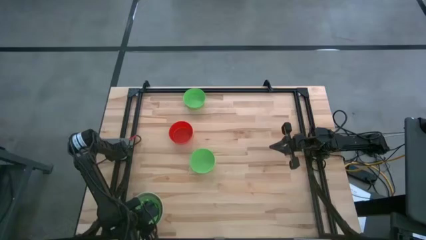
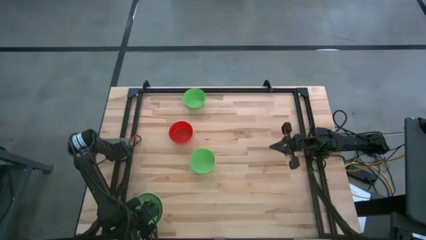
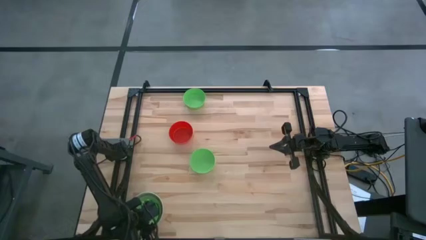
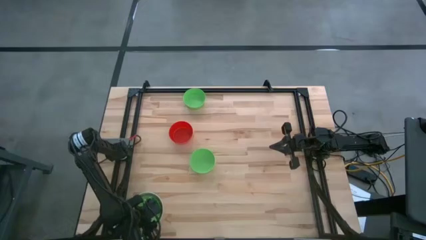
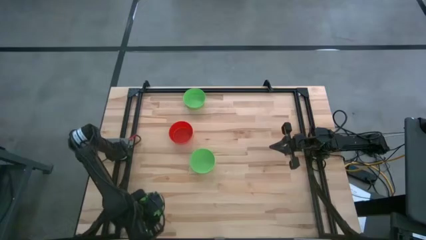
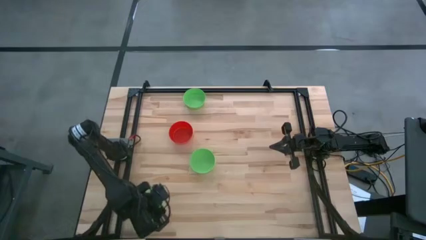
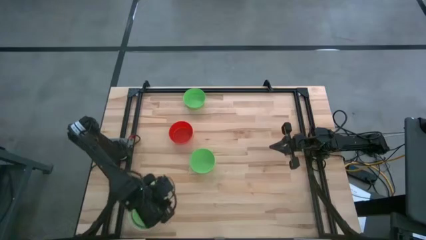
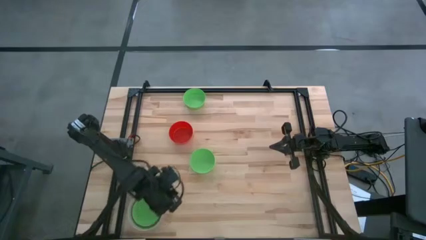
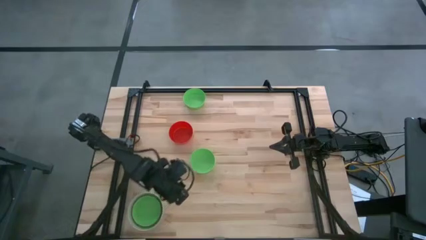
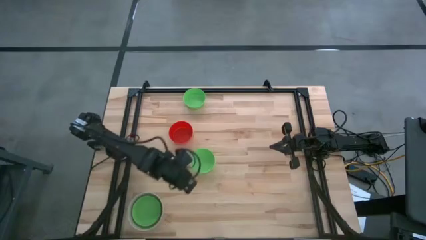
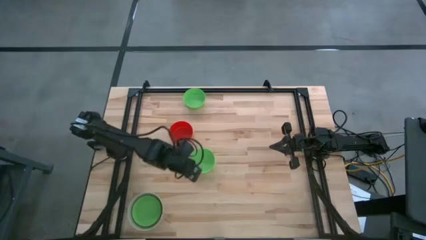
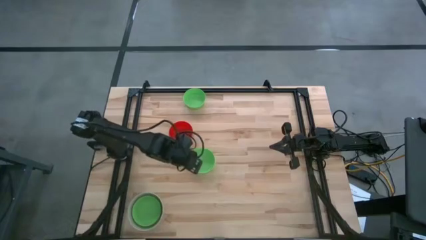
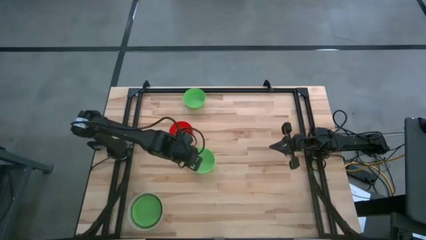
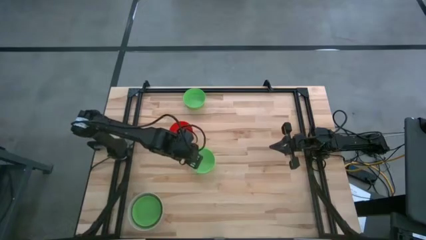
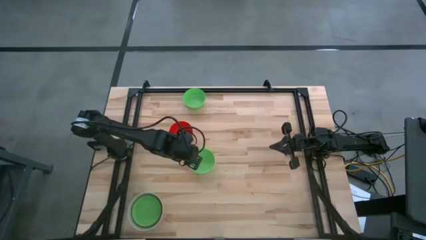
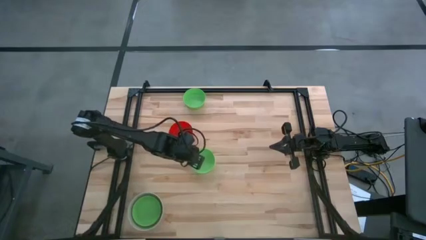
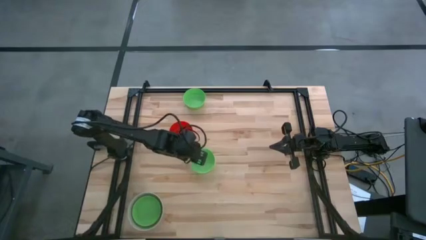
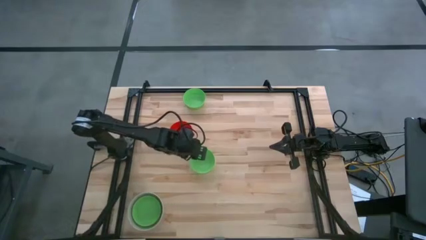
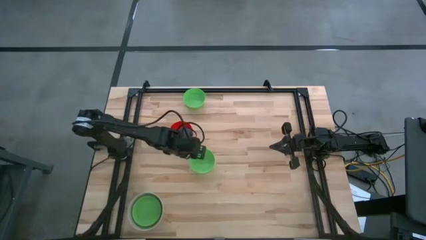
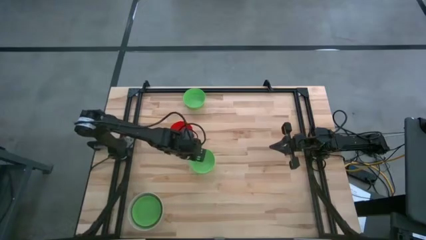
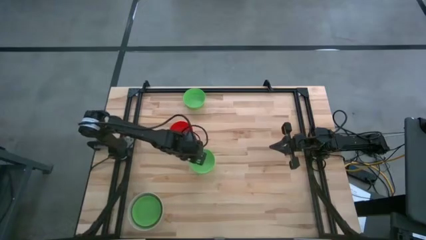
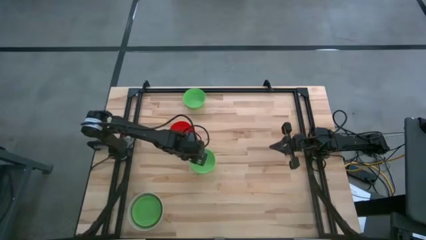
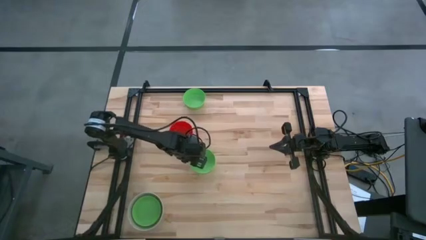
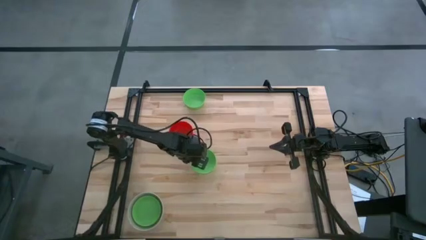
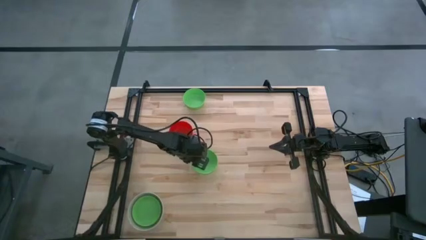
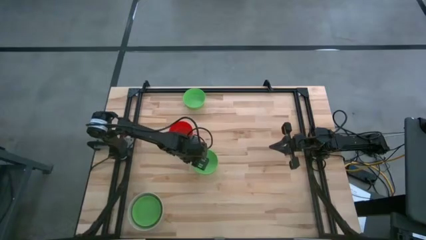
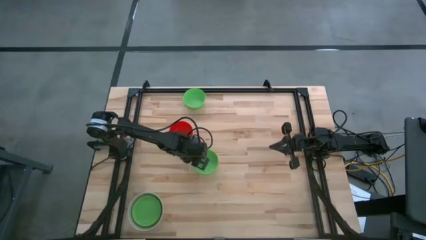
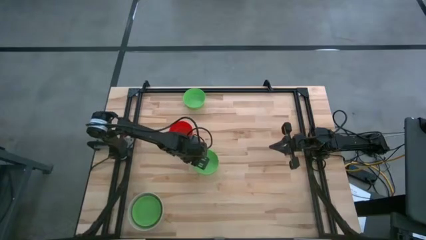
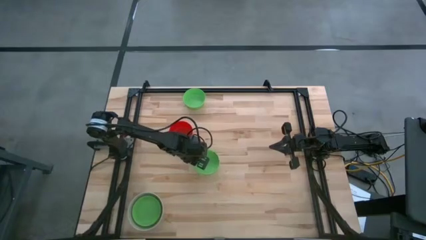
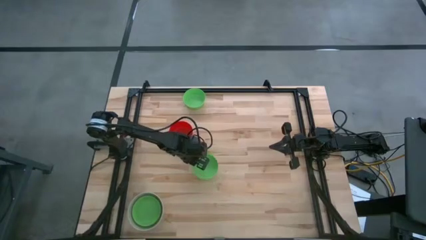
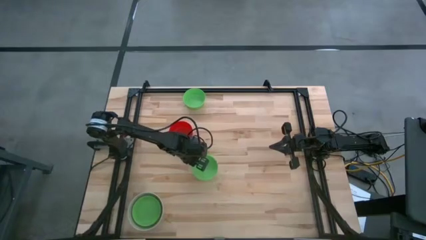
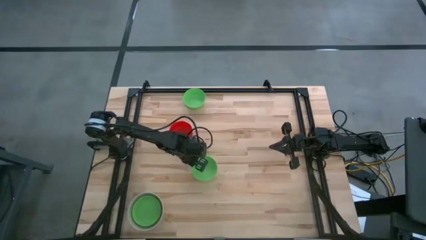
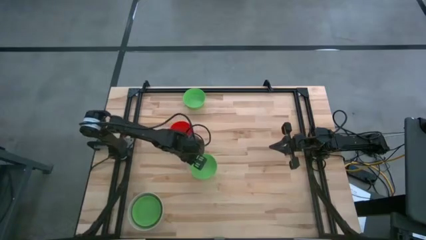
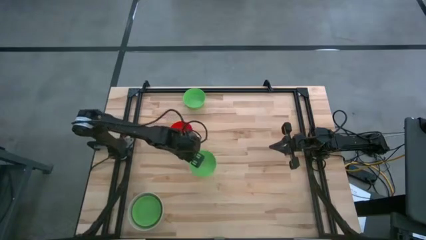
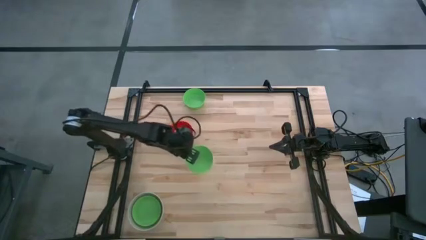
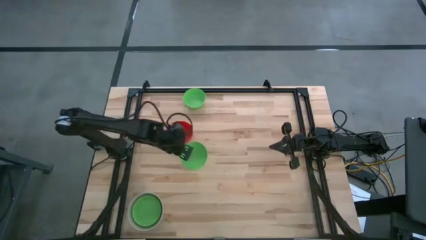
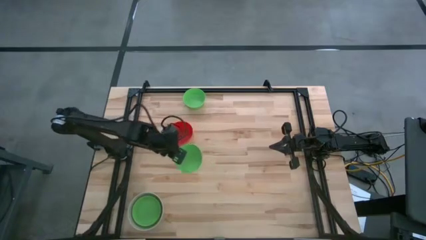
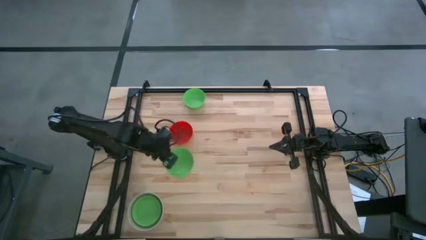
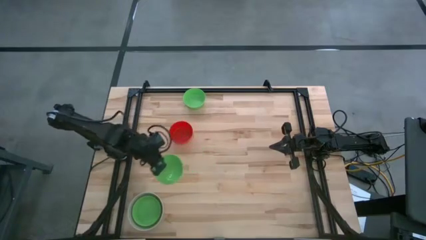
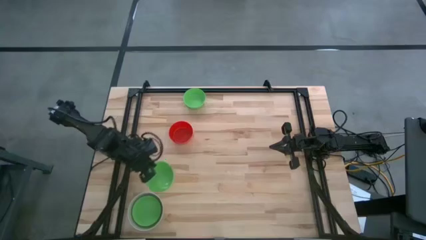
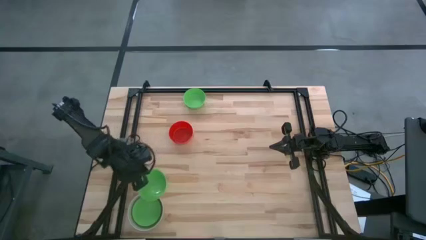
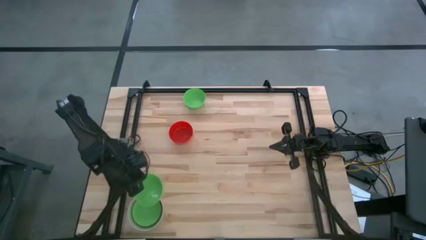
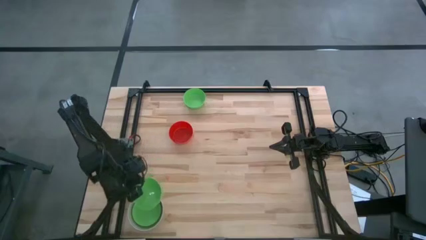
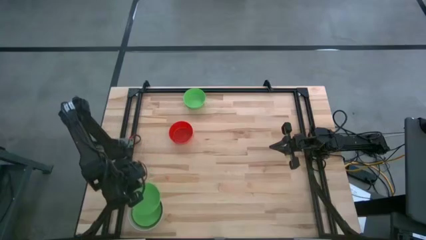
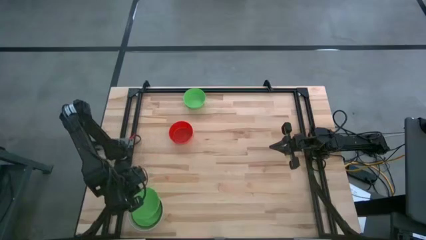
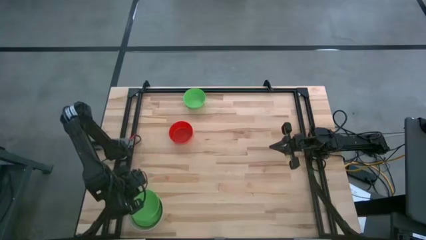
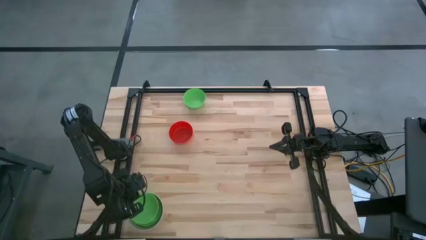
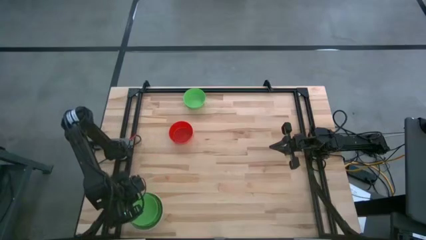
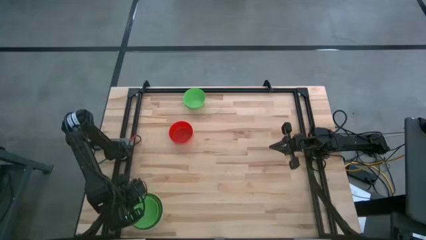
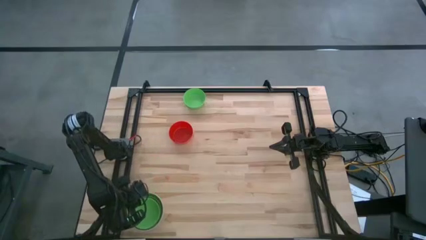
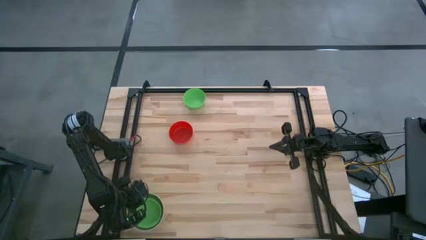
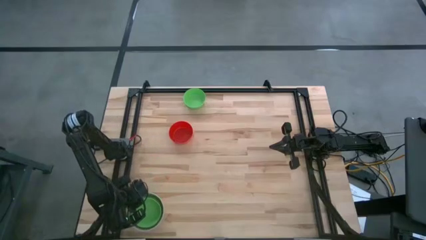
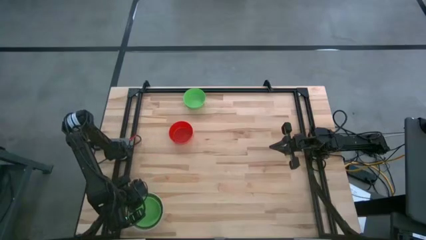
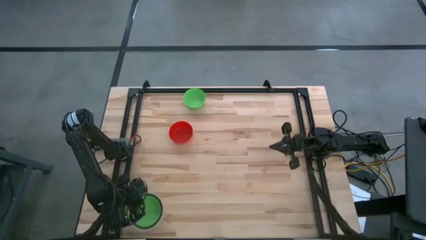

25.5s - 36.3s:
Stack the bottom green bowl on top of the green bowl

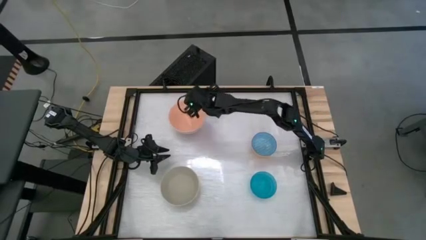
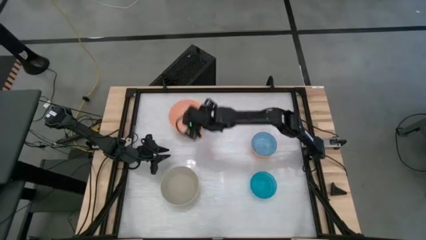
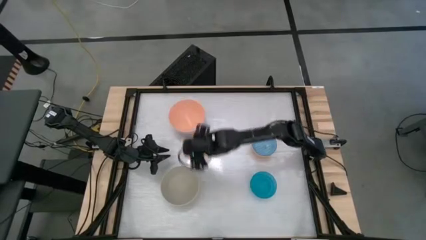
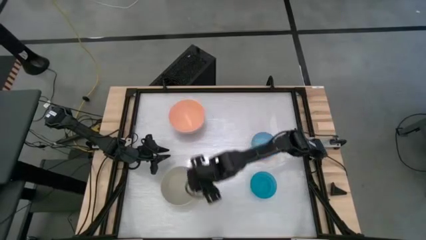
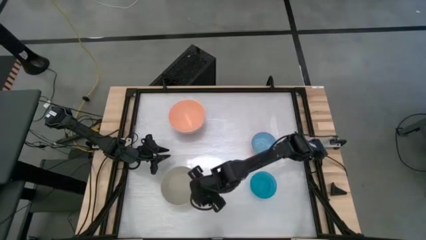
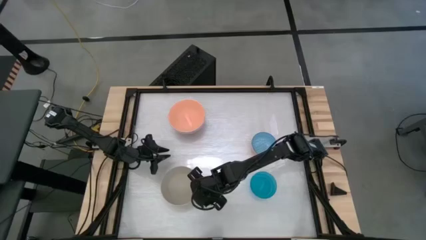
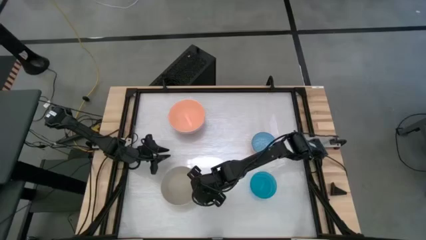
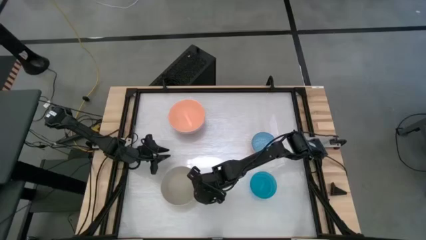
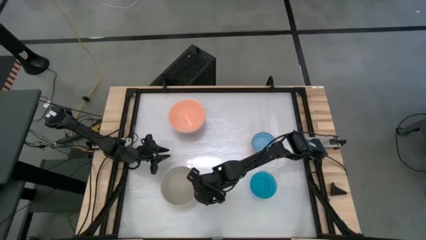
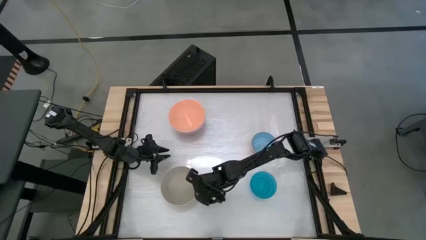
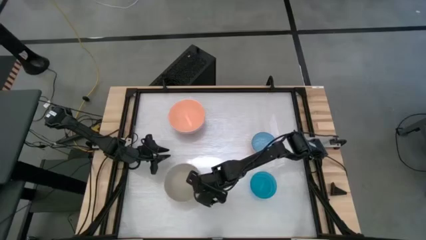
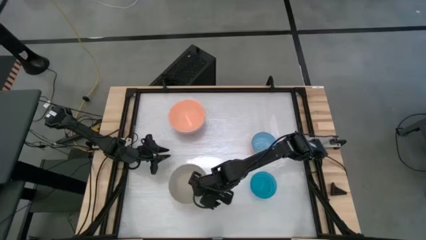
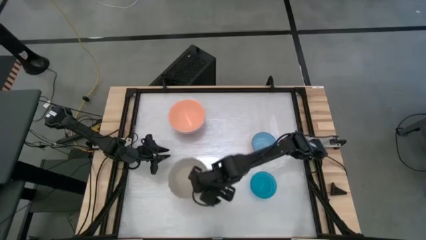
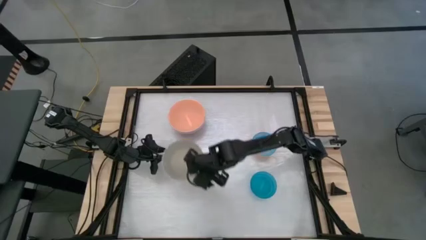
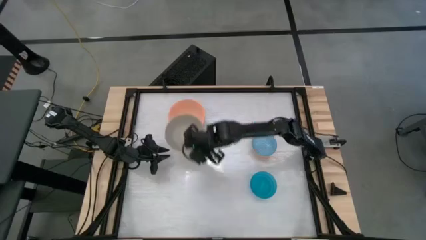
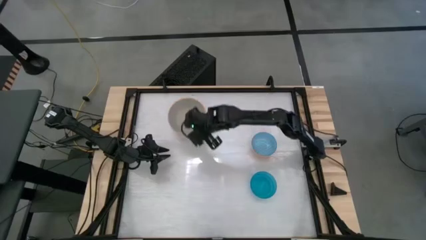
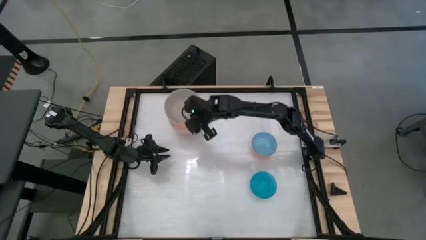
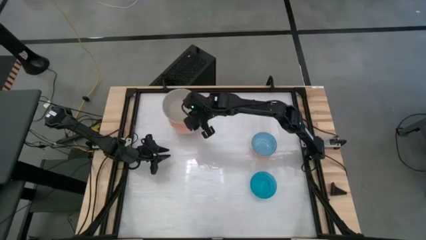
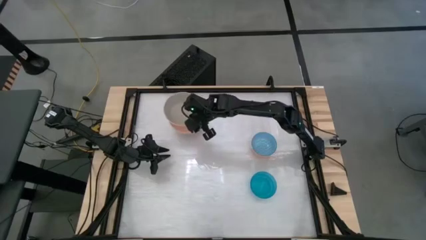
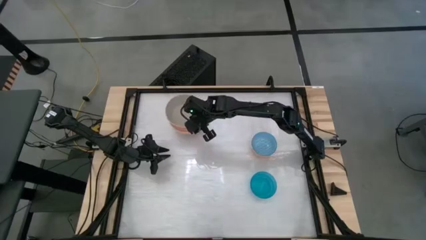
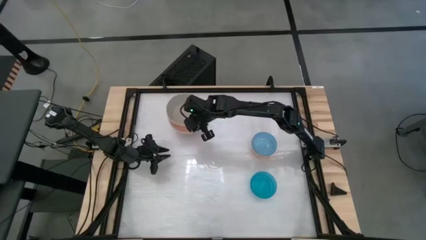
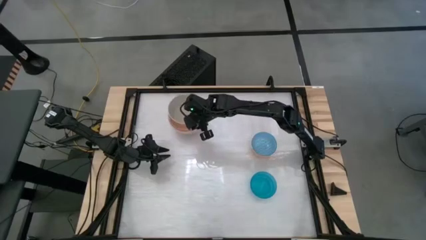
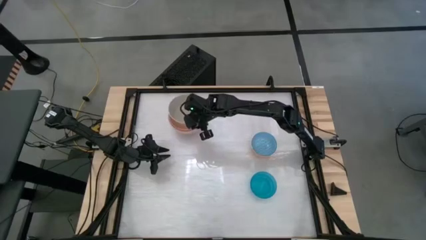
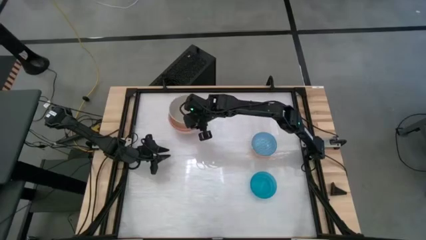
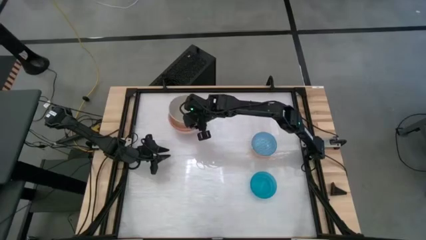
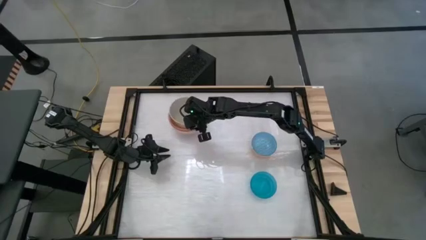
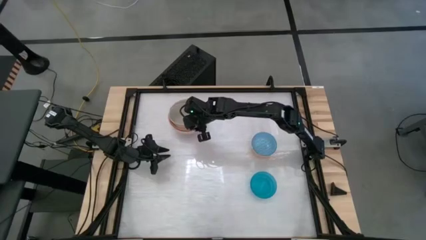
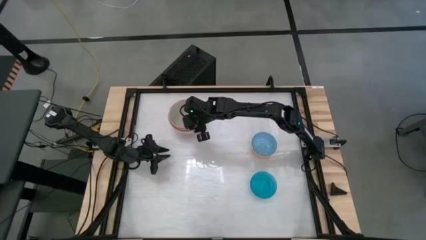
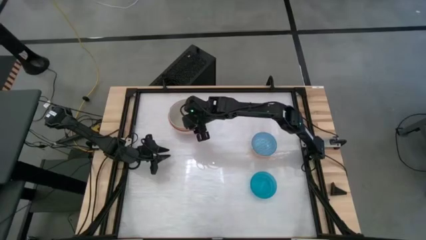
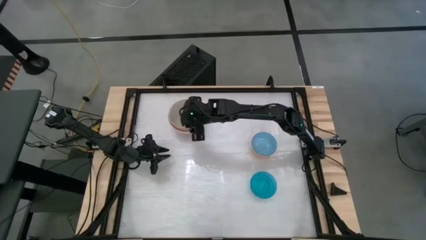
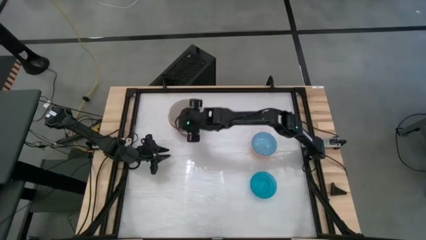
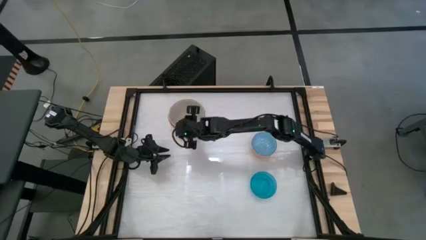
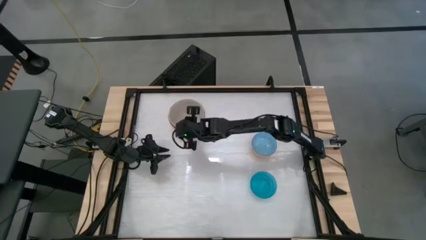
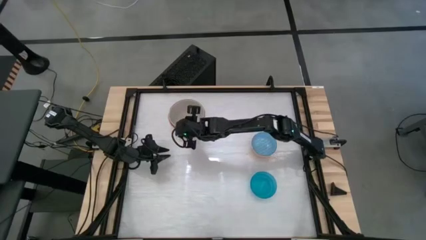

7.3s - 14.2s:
Stack the gray bowl on top of the orange bowl
